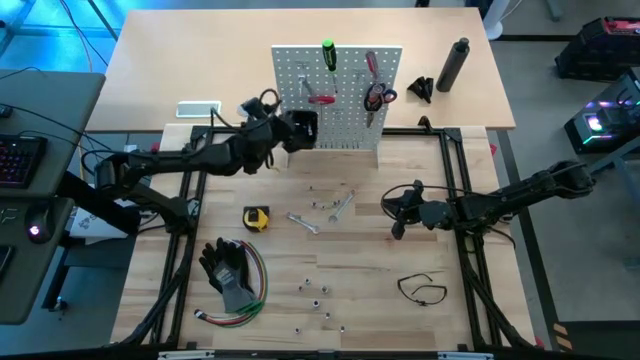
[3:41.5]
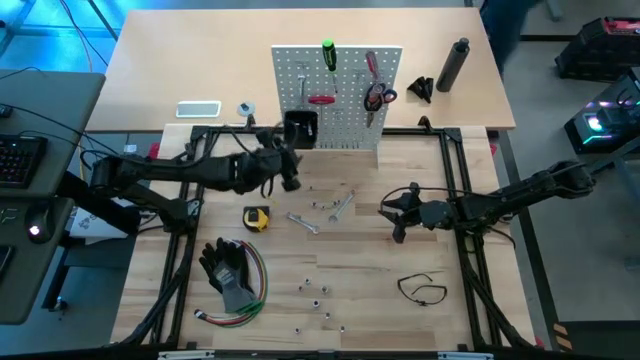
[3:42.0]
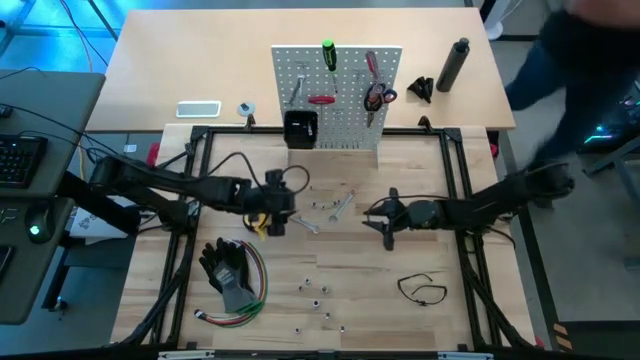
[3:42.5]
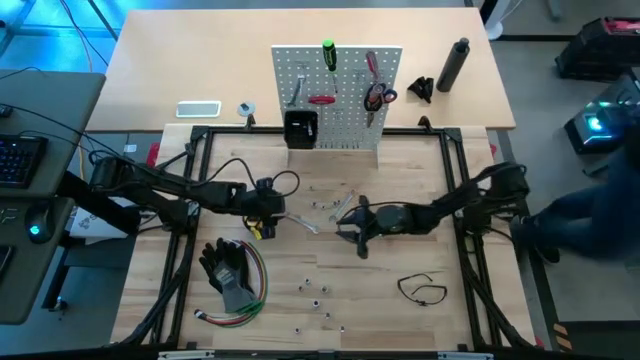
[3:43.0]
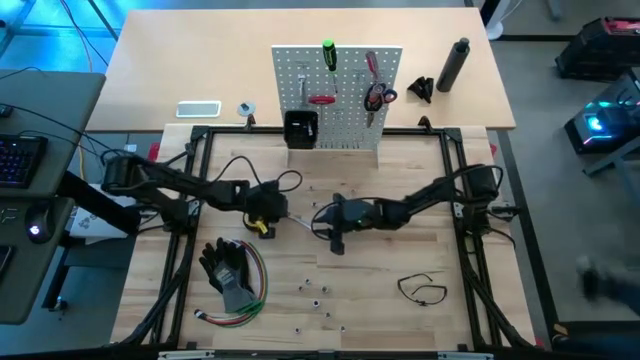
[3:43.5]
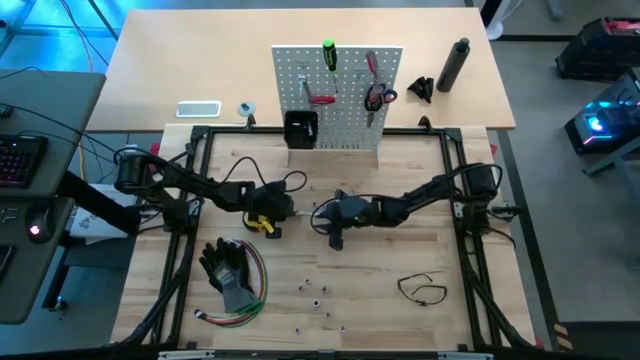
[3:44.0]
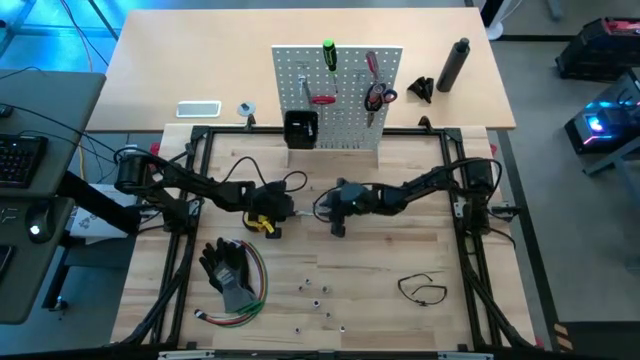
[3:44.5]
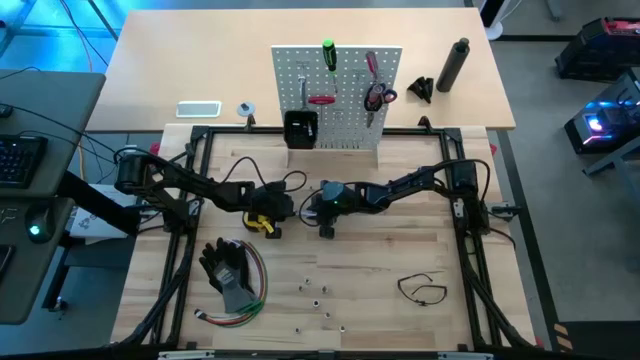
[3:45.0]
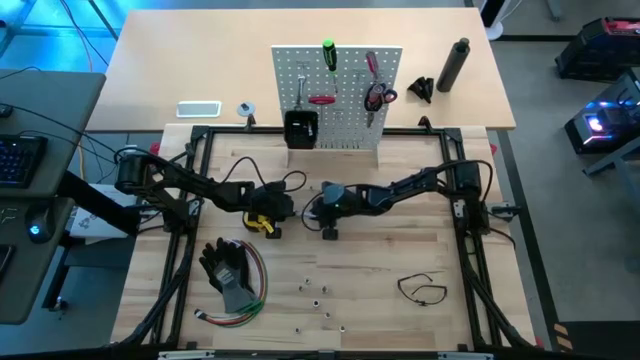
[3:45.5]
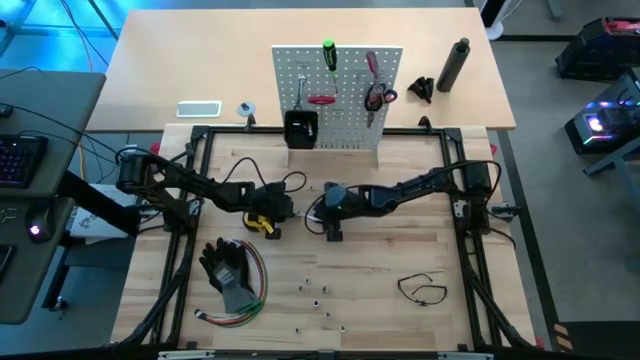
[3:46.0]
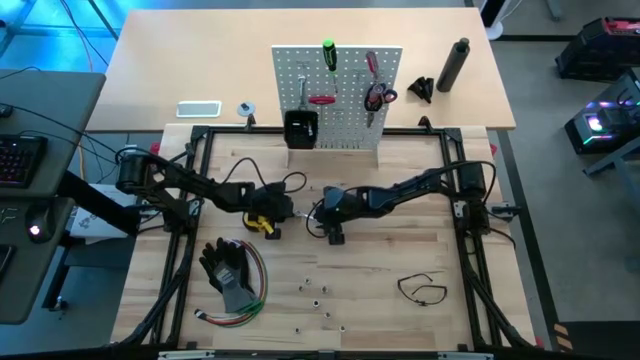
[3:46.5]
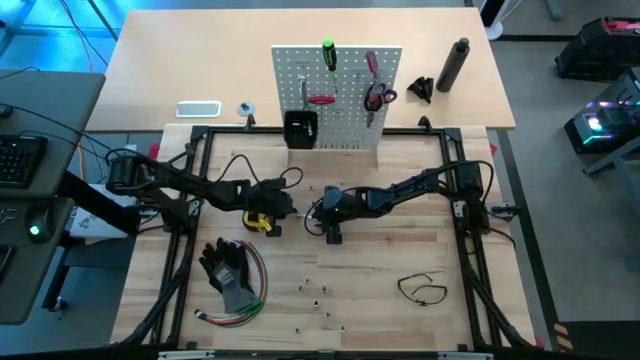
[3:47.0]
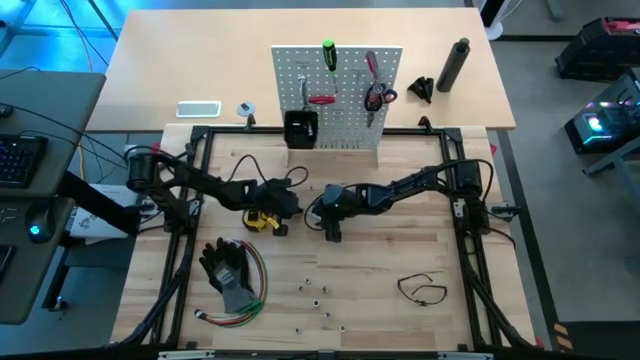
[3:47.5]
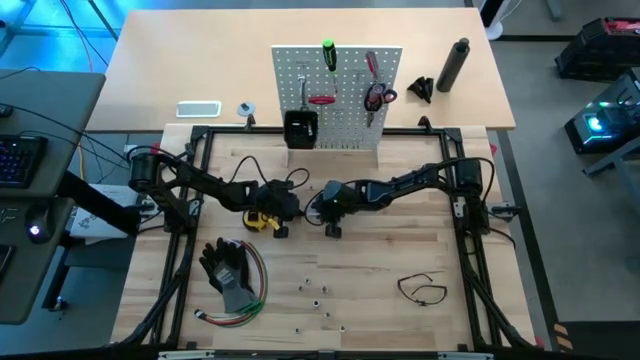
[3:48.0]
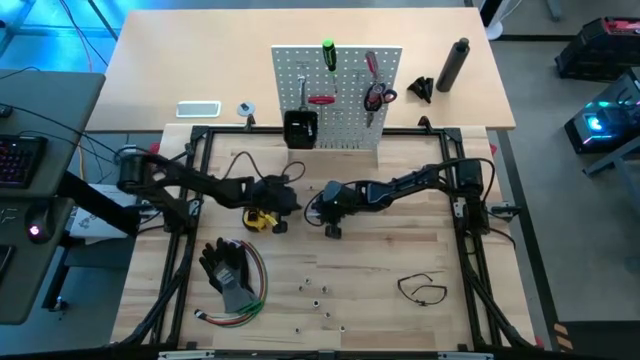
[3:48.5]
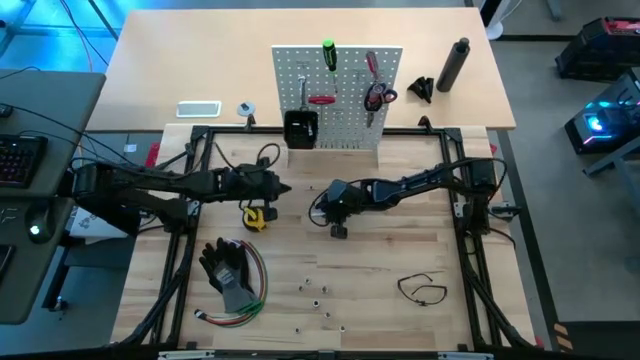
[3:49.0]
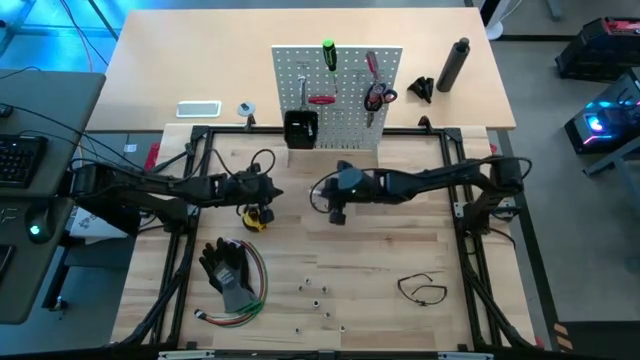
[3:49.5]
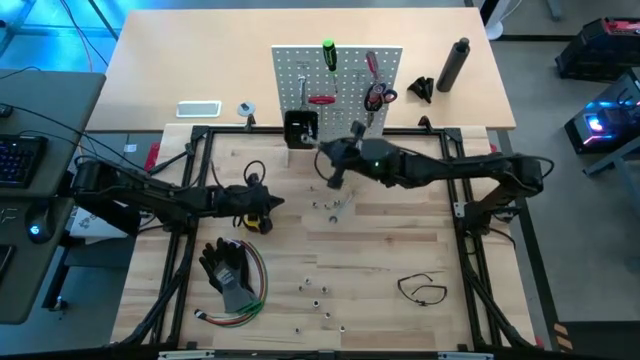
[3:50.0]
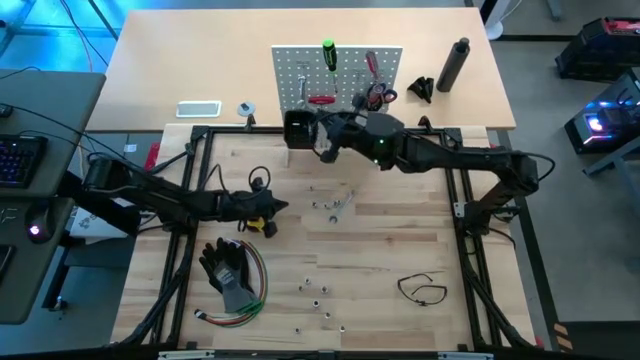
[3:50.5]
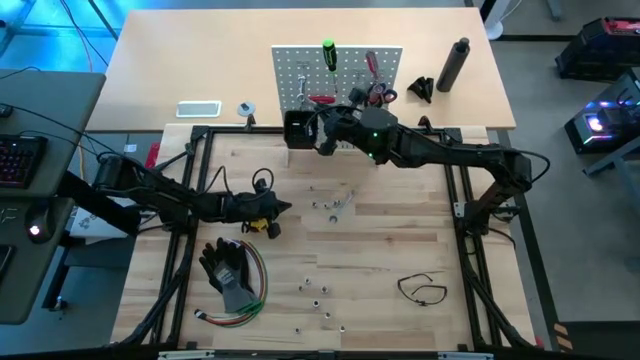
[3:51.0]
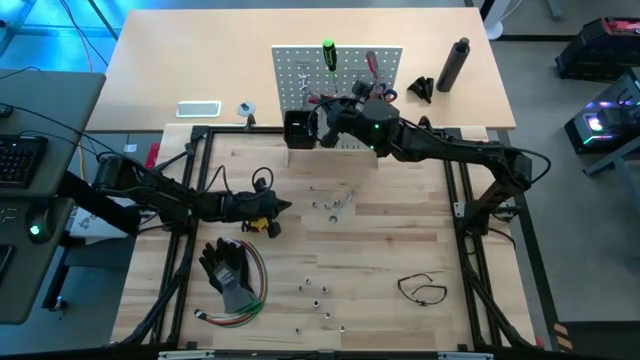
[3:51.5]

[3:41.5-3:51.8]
Task: Hang tools onto peg board
Hang the left silver wrench on the white peg board

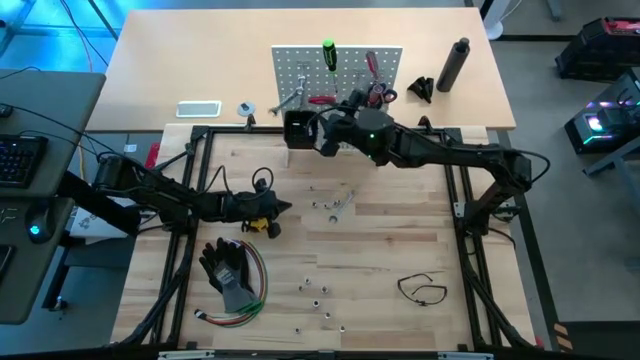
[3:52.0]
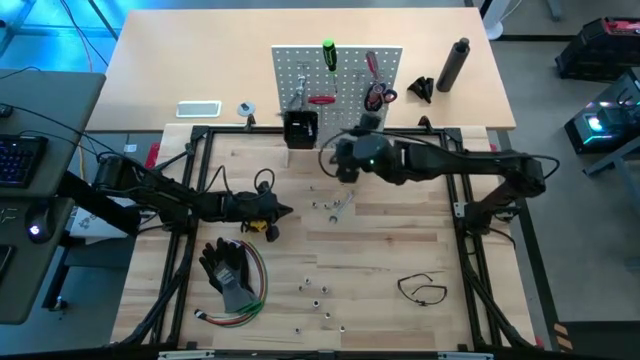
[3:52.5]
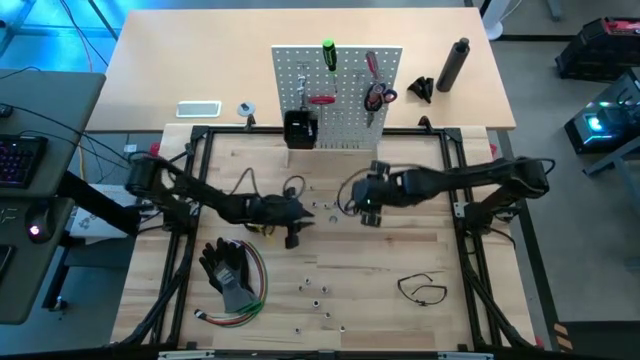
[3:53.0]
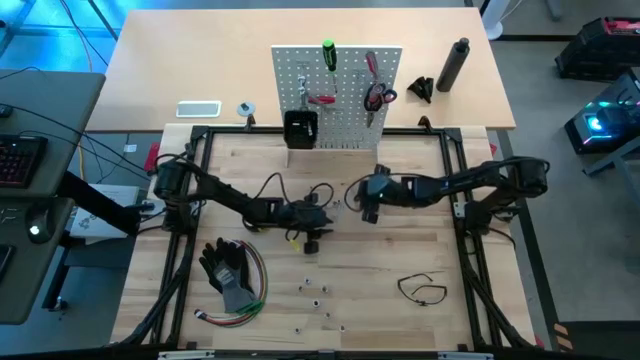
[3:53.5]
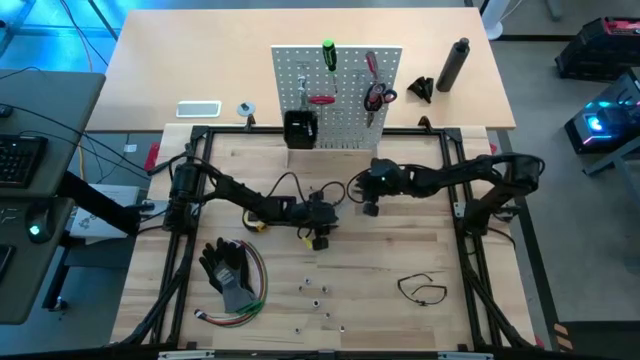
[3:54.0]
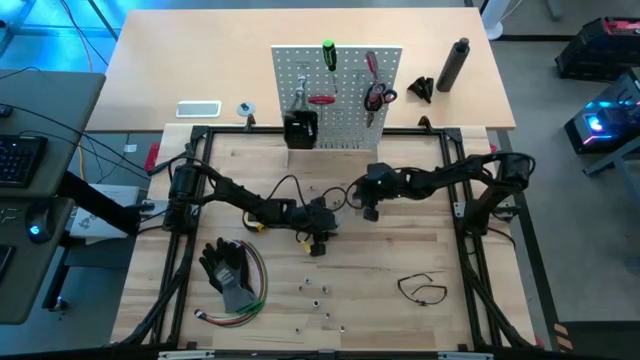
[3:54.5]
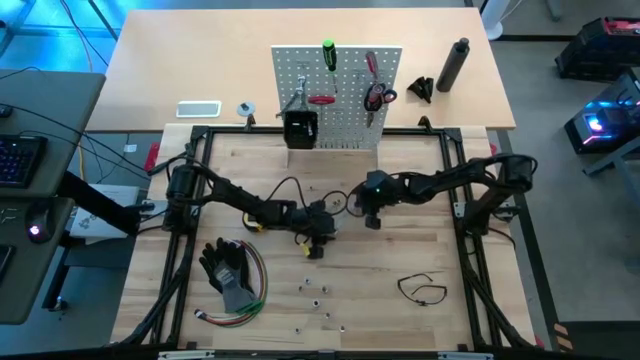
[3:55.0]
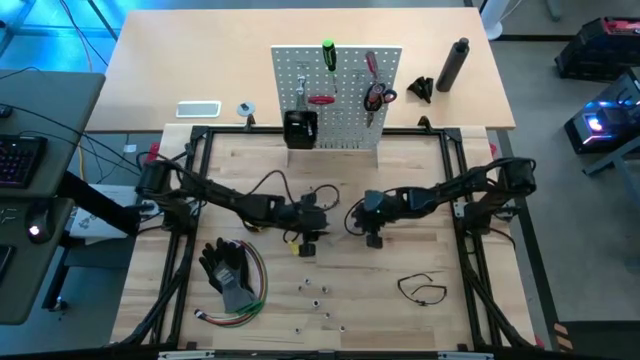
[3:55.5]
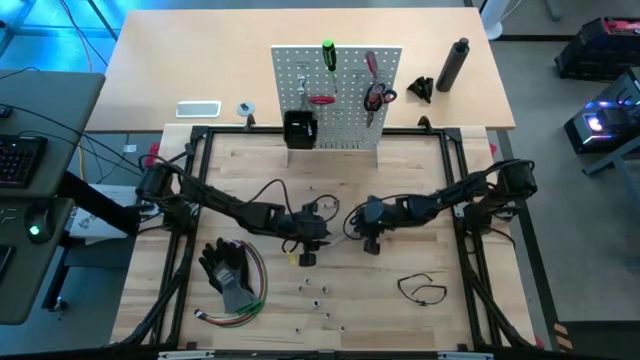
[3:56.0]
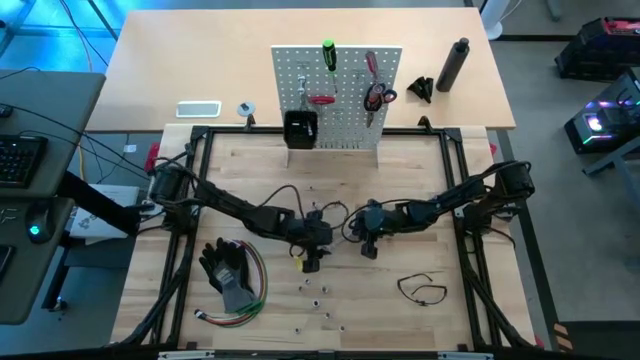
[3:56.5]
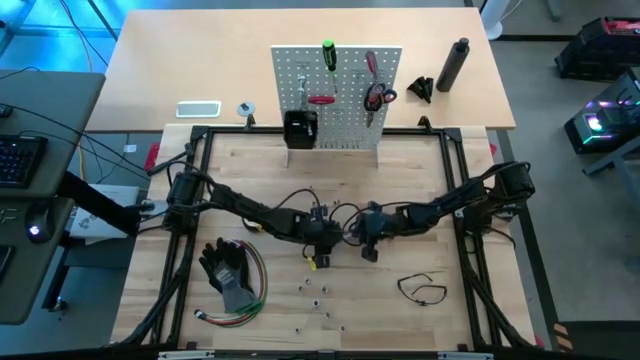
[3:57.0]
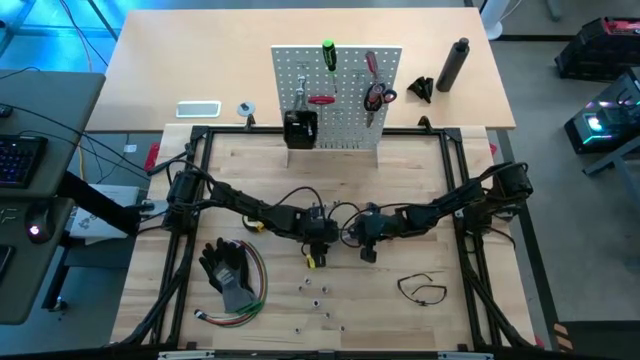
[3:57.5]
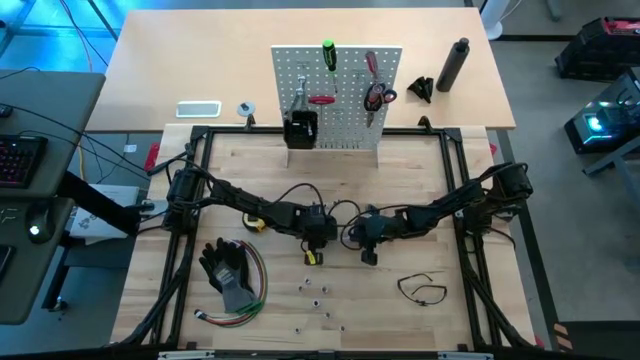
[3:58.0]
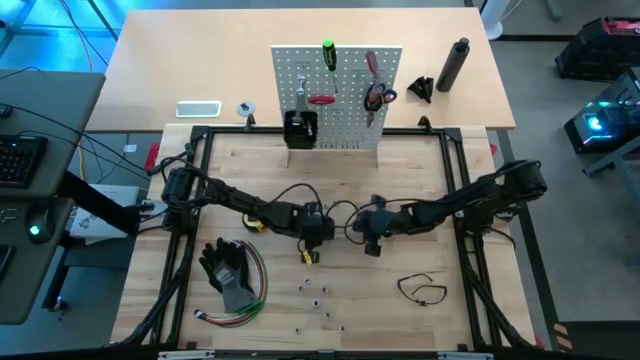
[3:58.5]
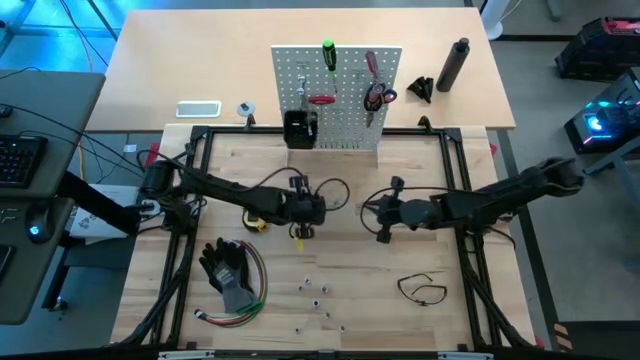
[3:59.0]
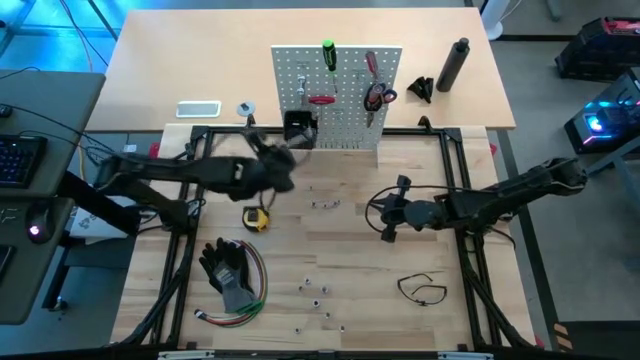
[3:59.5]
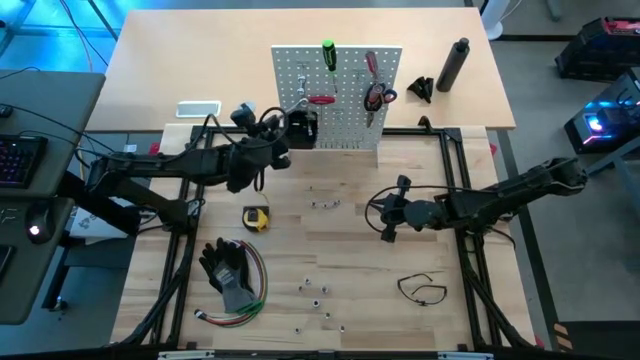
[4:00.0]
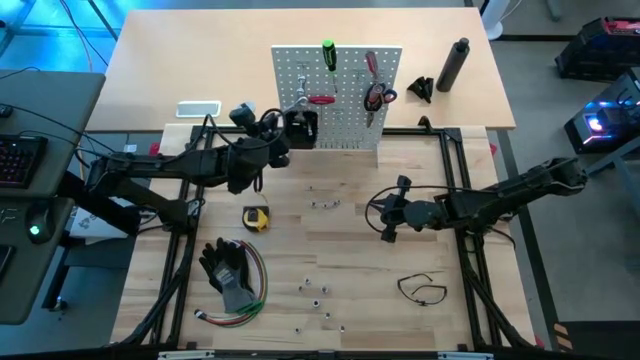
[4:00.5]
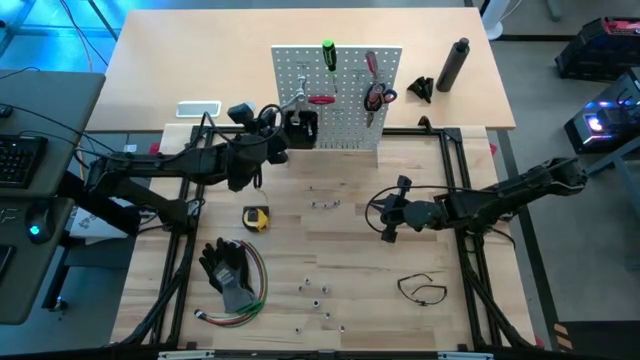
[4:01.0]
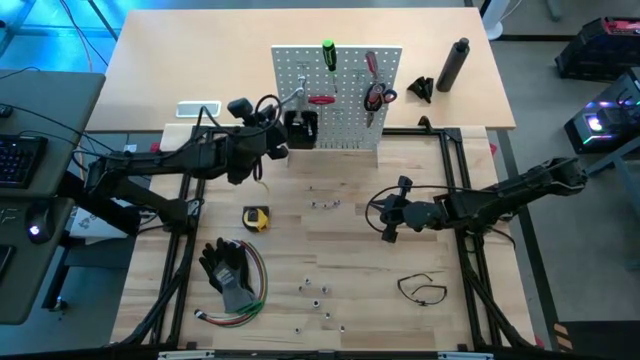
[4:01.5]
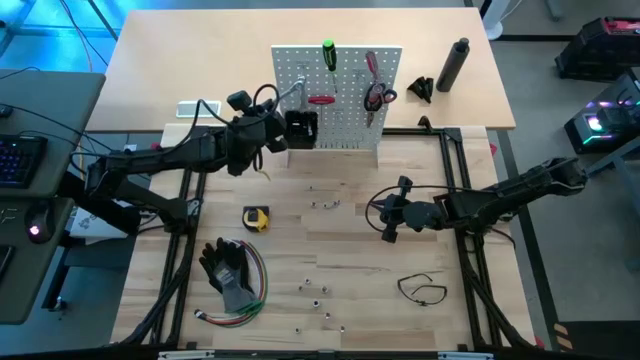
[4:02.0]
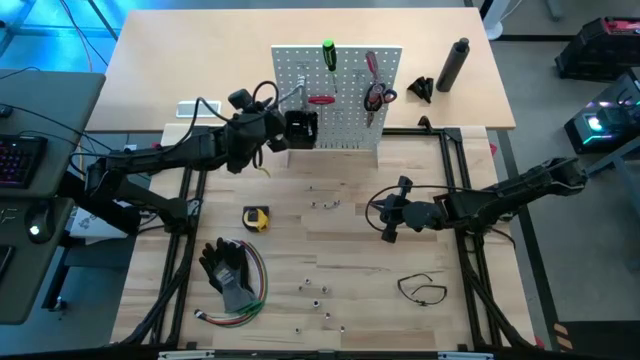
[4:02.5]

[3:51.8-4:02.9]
Hang the silver wrench on the white peg board
